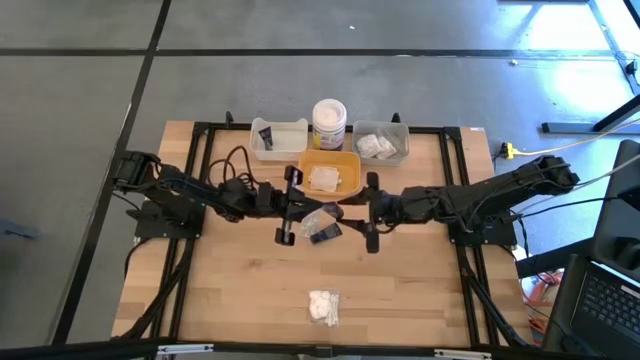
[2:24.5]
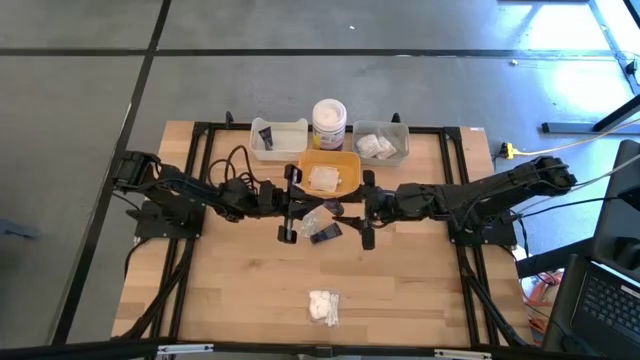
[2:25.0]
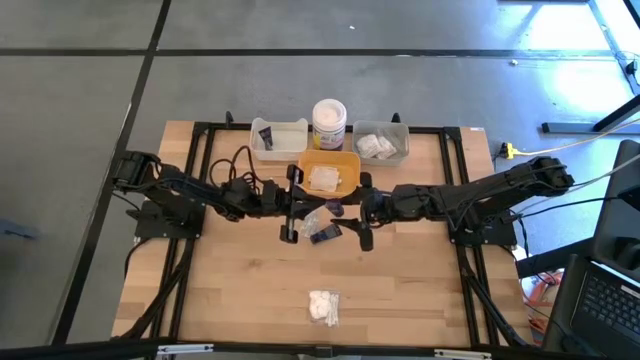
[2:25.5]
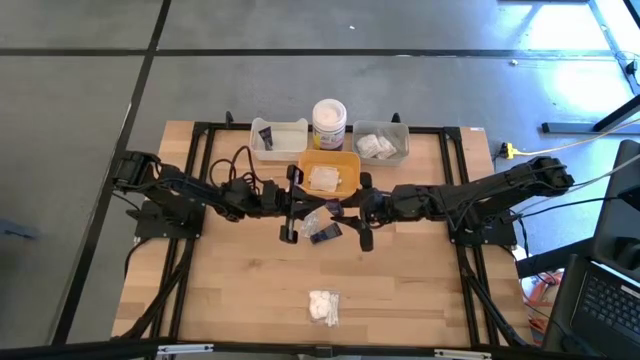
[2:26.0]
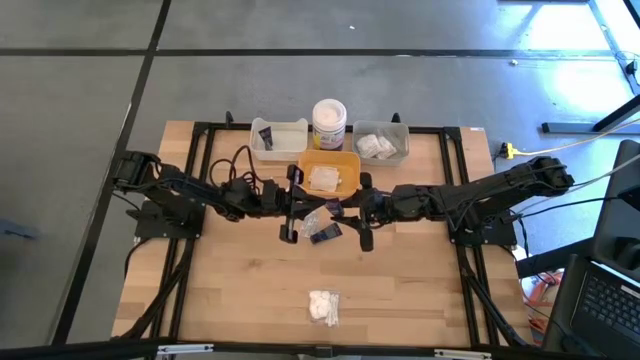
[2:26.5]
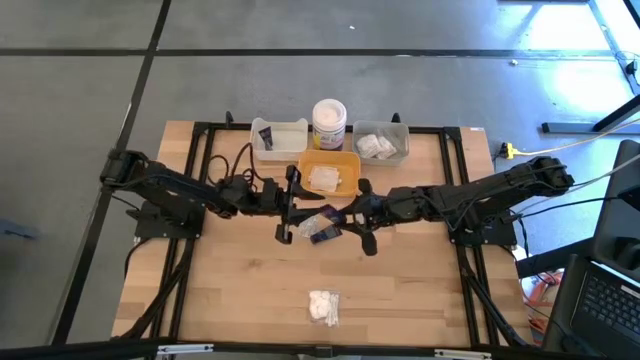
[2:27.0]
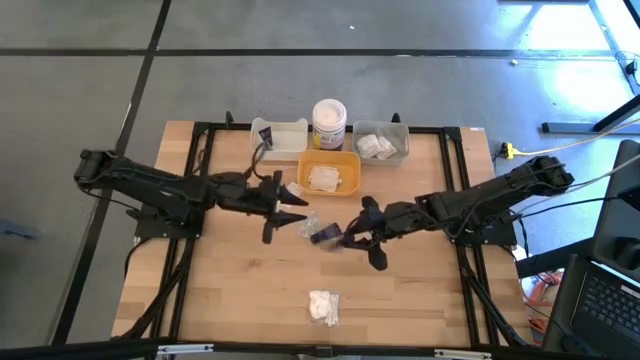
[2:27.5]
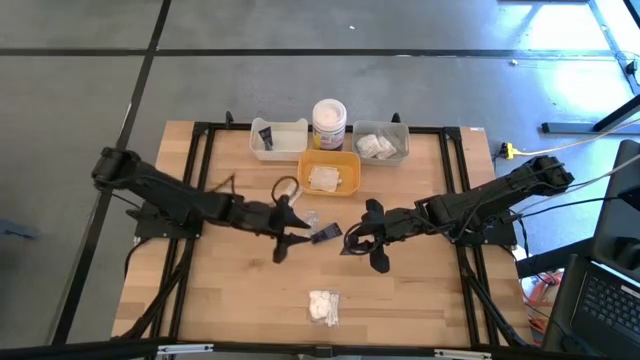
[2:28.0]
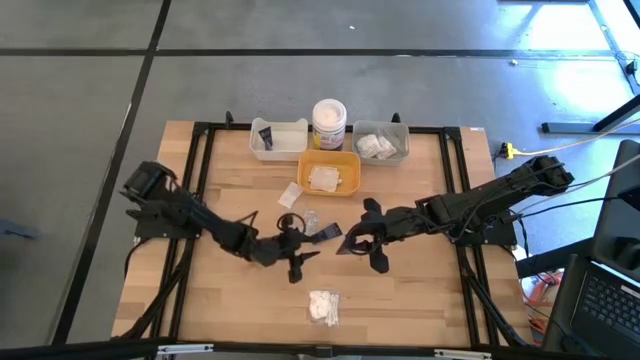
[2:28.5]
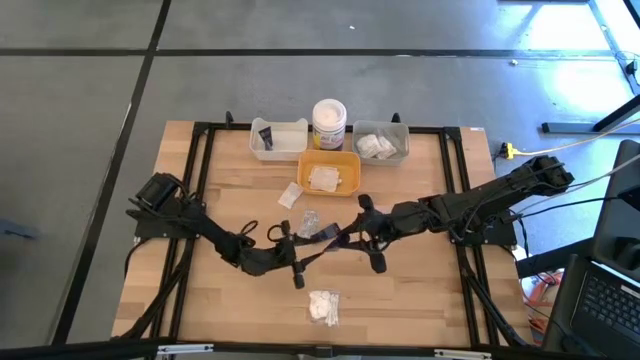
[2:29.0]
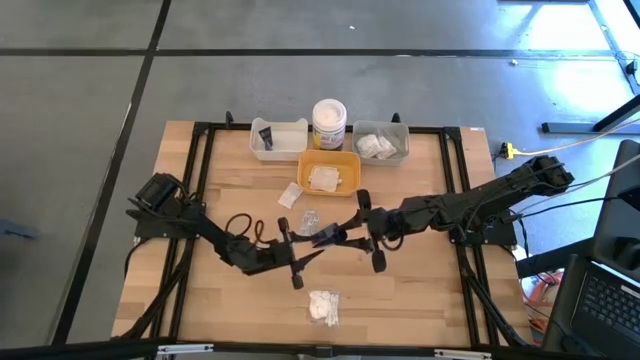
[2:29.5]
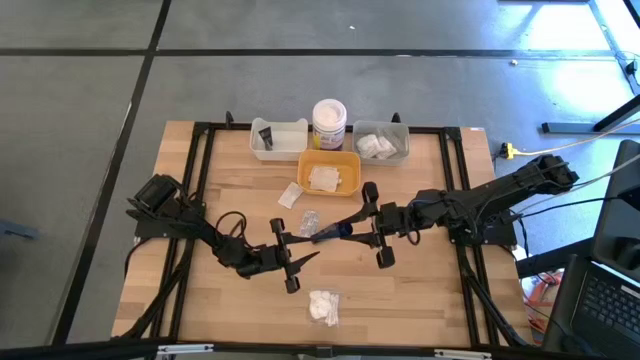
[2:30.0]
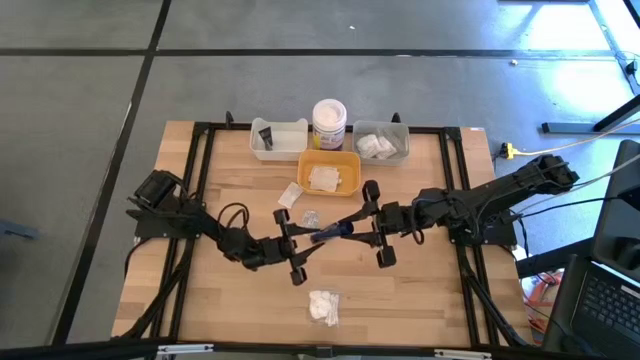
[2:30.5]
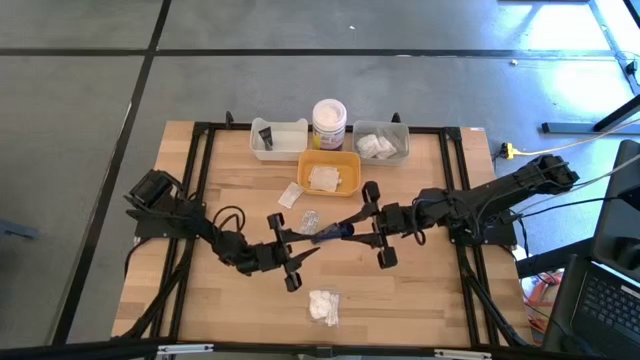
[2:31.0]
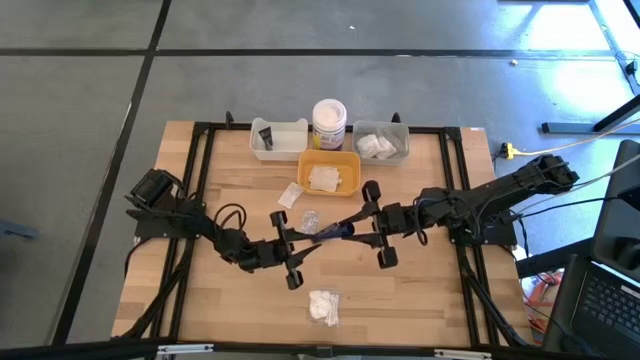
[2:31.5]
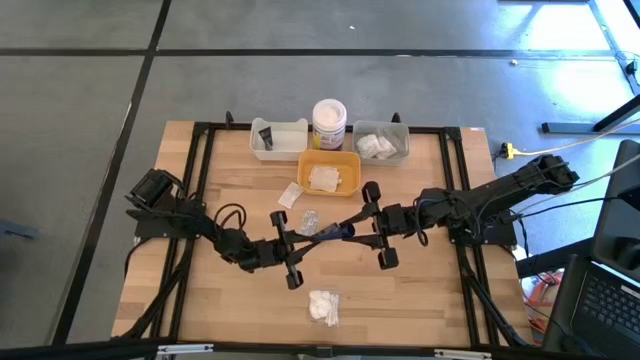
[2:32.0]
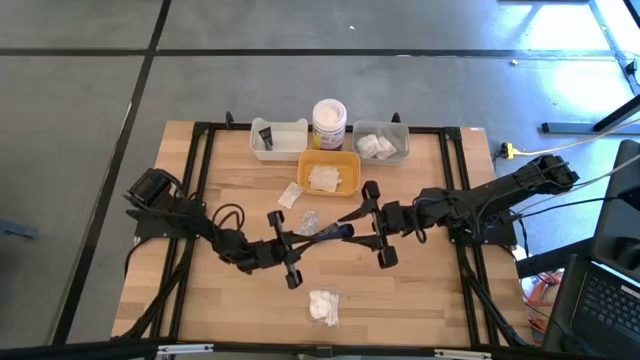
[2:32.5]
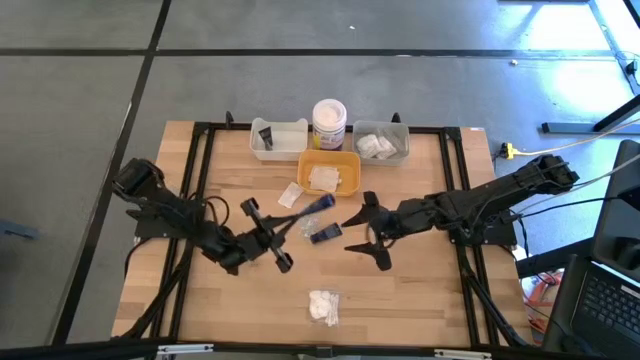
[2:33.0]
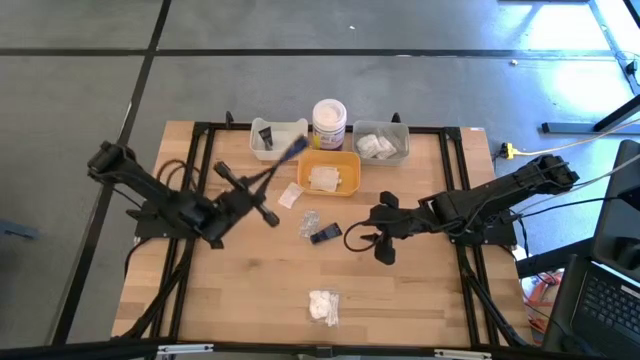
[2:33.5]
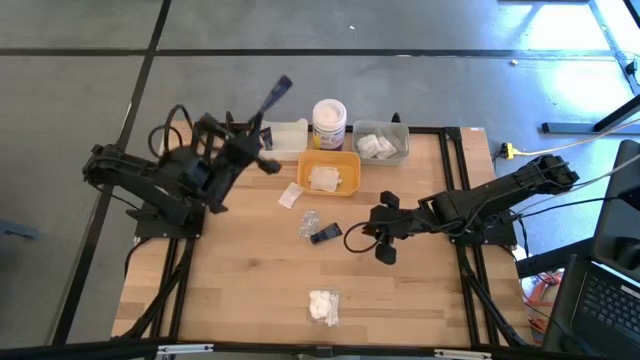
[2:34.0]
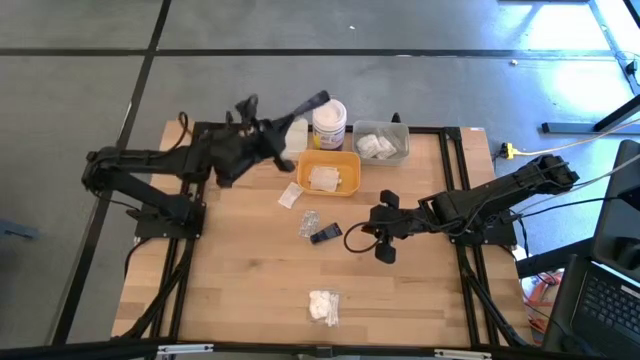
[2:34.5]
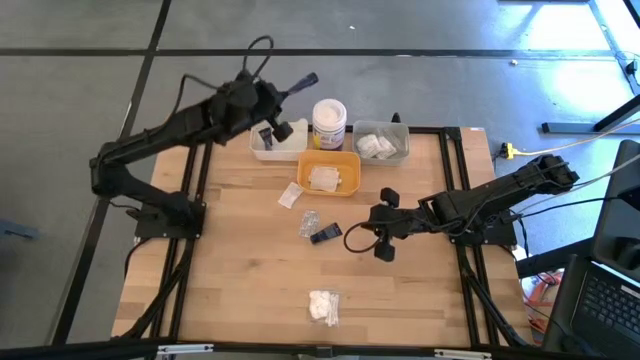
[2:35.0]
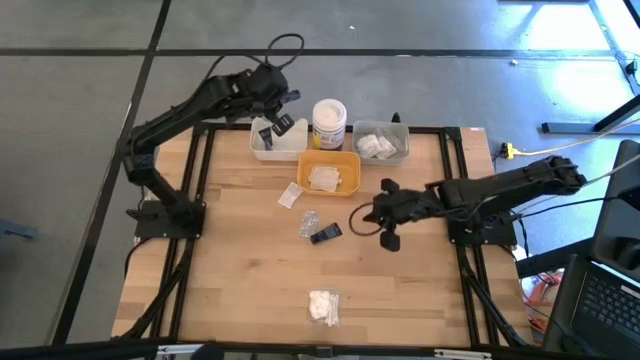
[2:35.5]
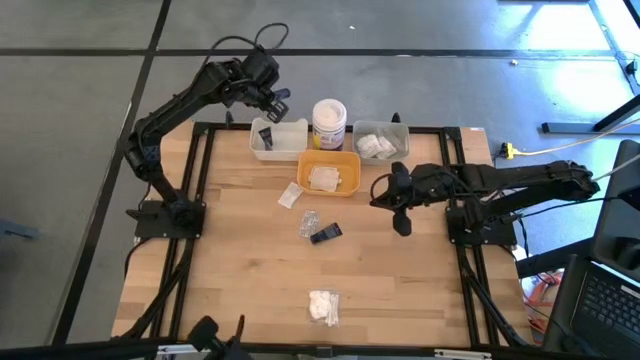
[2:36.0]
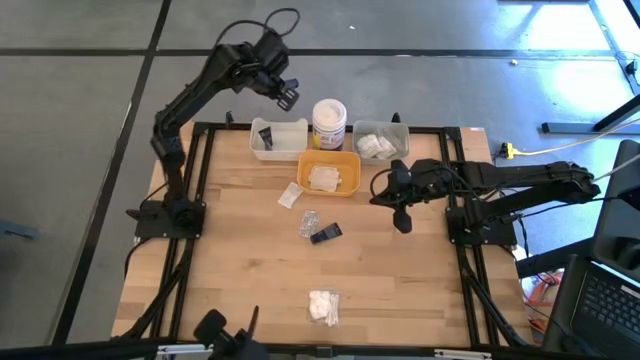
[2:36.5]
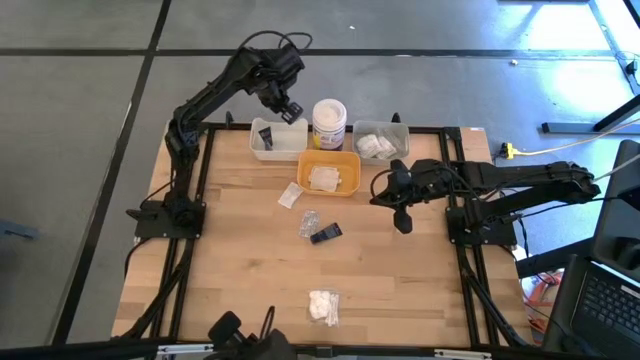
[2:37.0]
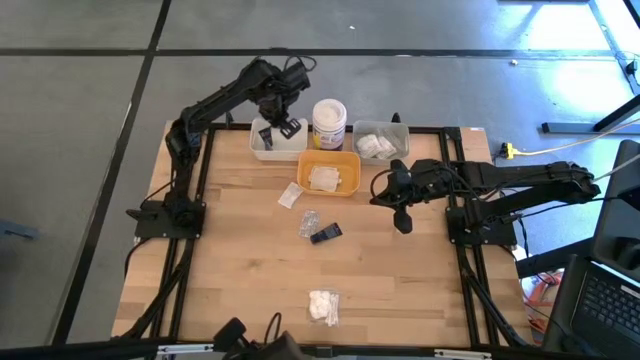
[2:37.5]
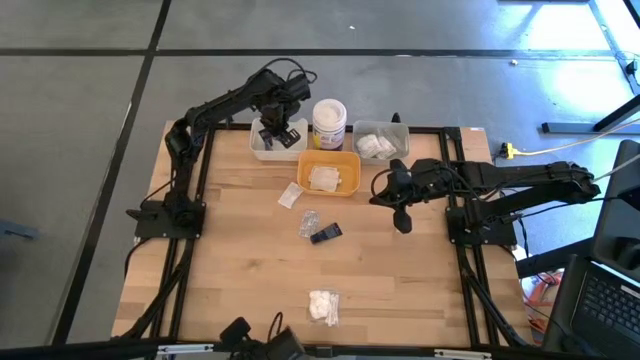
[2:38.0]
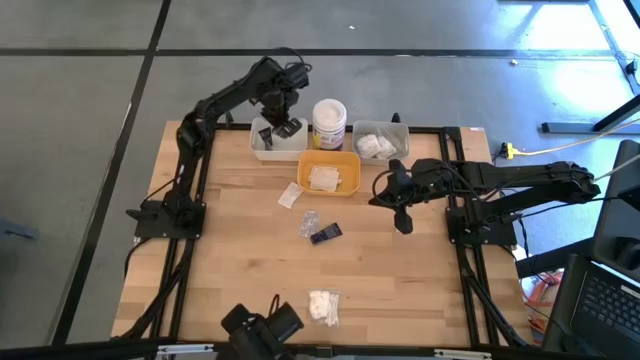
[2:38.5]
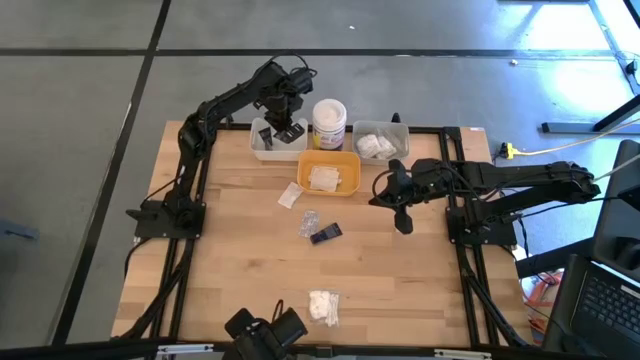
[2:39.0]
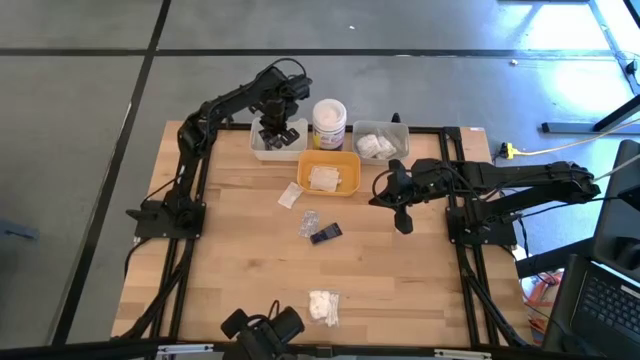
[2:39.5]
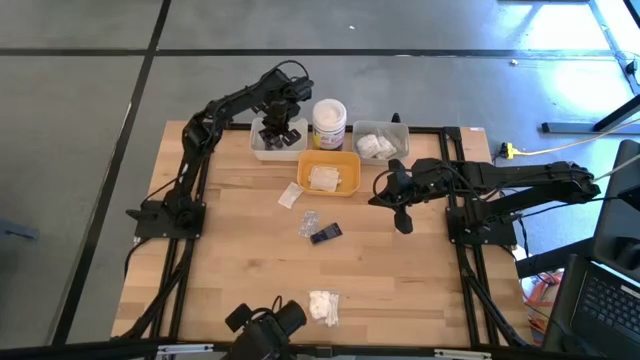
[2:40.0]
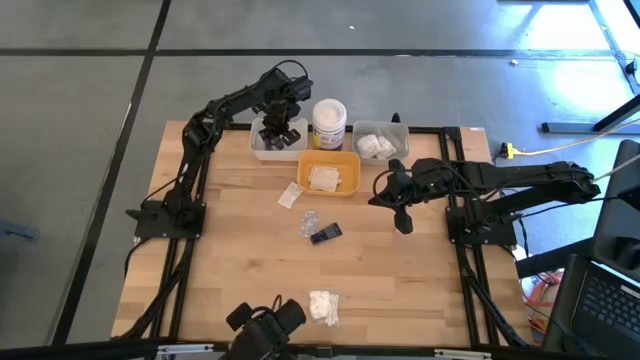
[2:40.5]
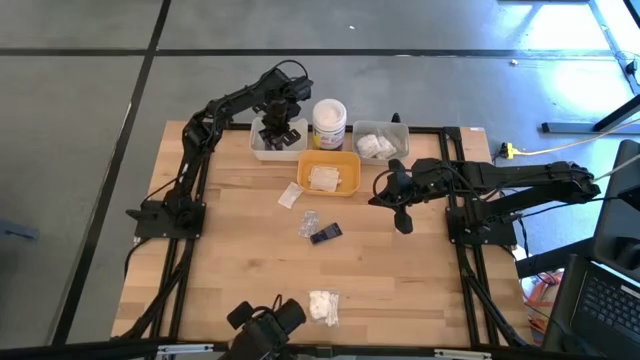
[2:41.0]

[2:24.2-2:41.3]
Task: Pick & Place Travel size toiletries
Put the blue shave cream into the white bin

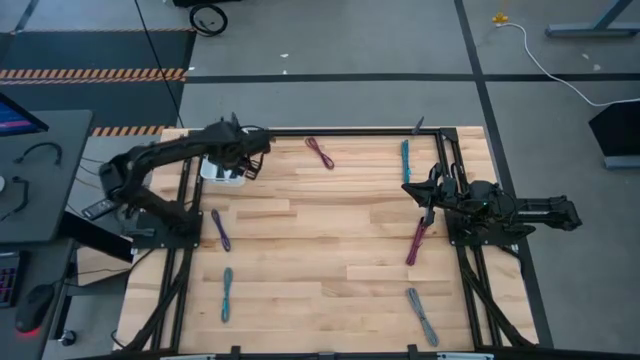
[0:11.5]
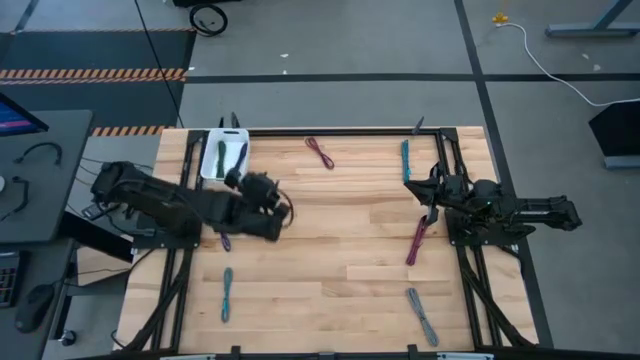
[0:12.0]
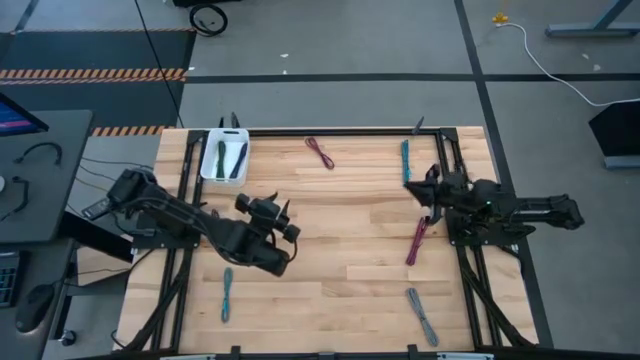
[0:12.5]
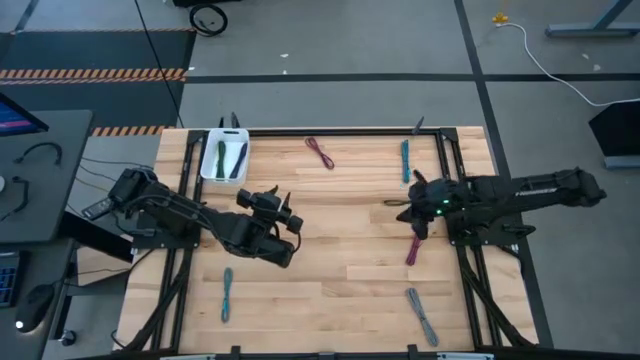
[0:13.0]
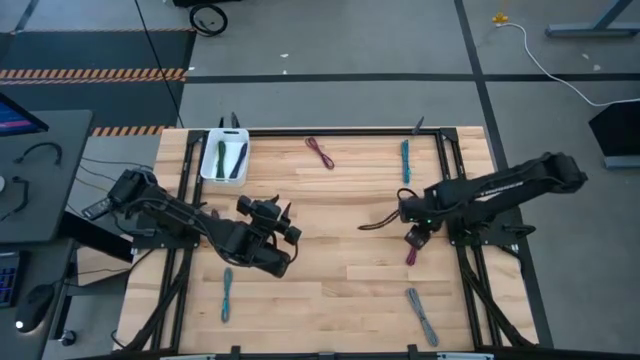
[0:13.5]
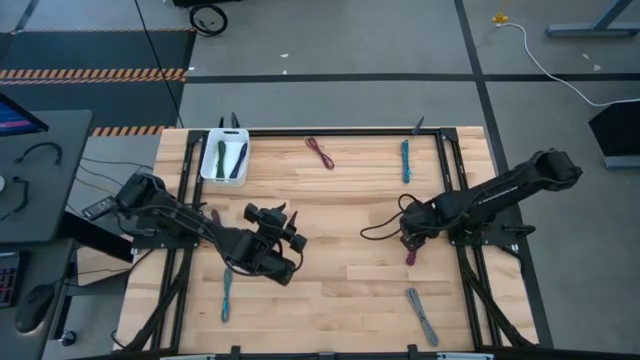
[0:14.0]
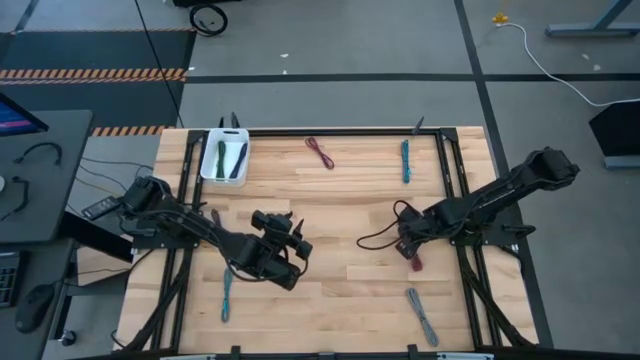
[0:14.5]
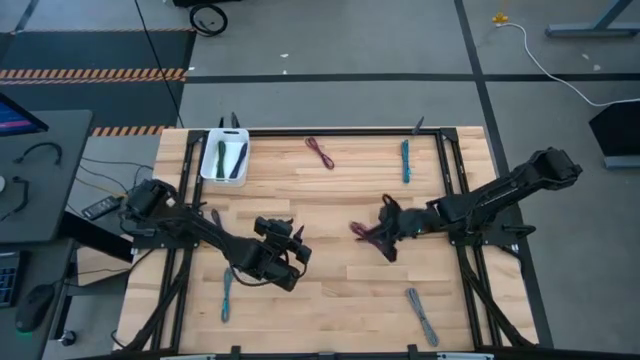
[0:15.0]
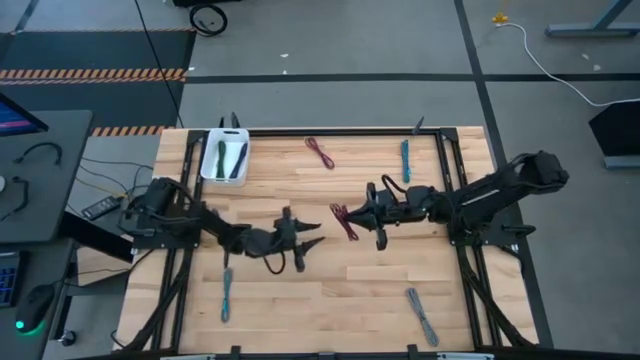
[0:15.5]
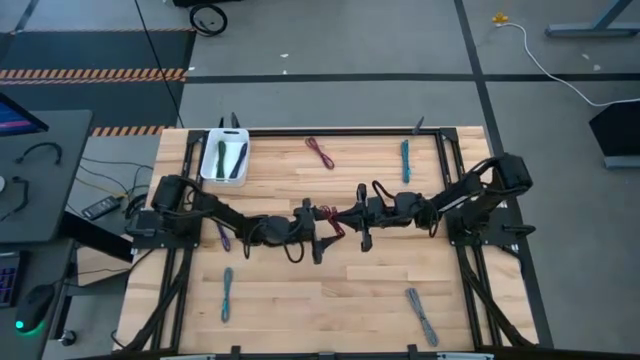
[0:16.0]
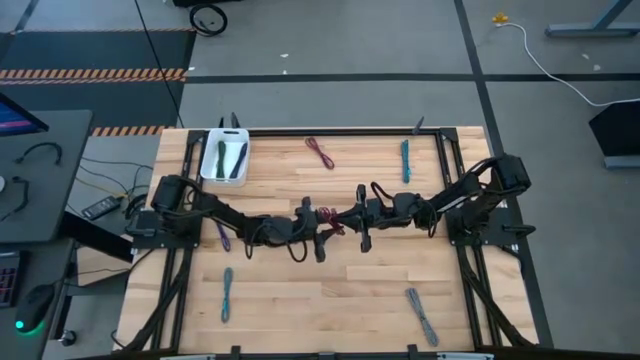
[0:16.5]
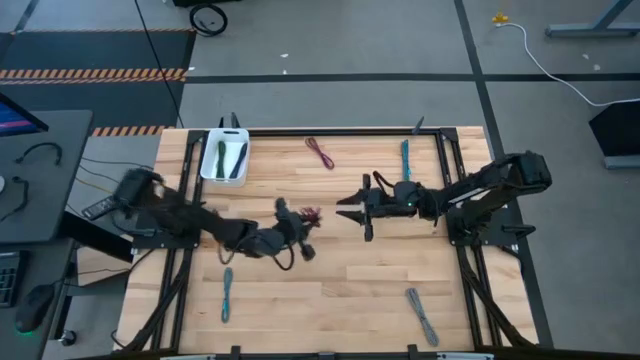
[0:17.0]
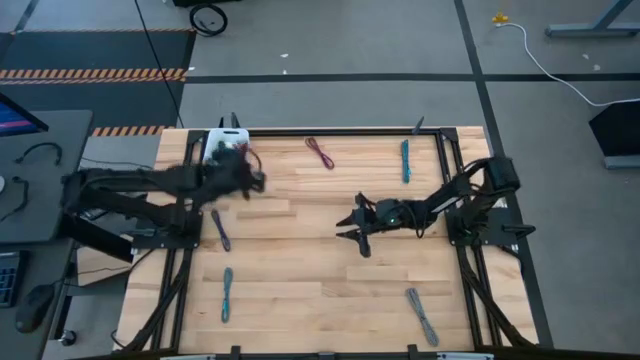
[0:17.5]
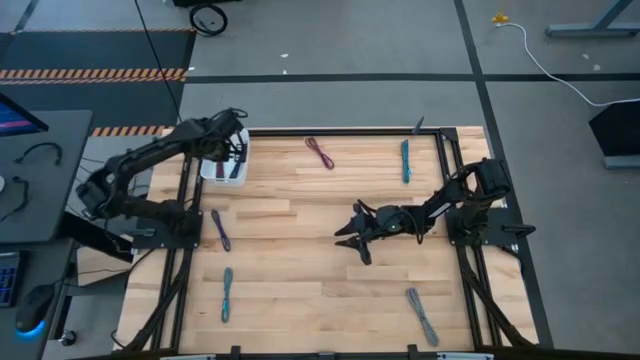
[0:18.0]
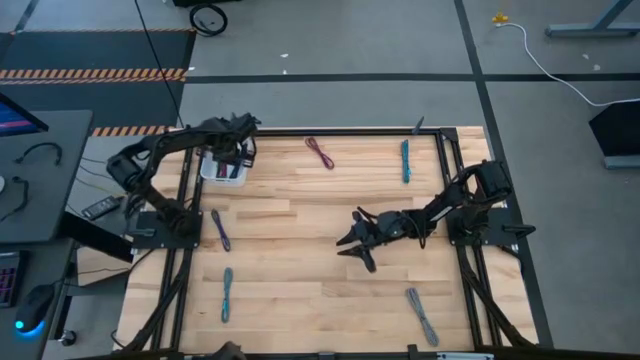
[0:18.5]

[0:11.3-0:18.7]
Task: Pick and place USB-C Cables
Put the bottom pink charger cable into the white bin
